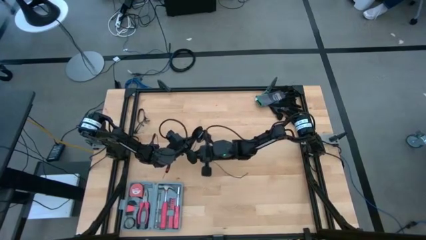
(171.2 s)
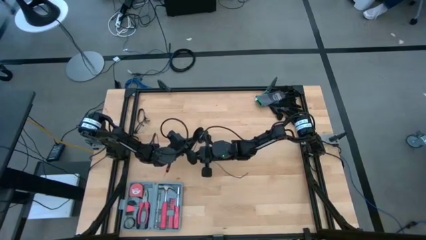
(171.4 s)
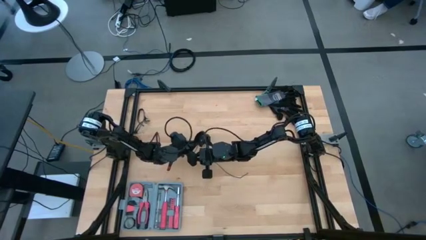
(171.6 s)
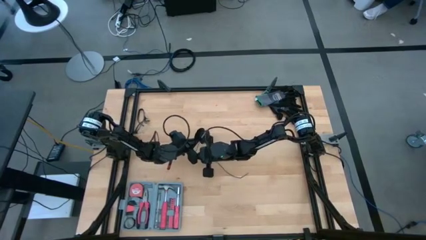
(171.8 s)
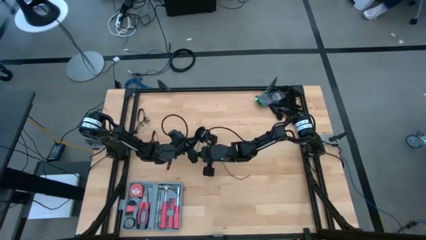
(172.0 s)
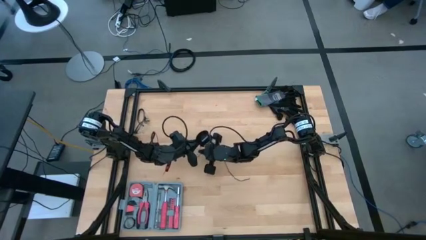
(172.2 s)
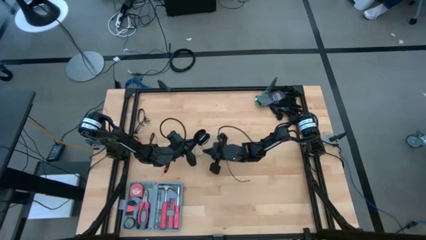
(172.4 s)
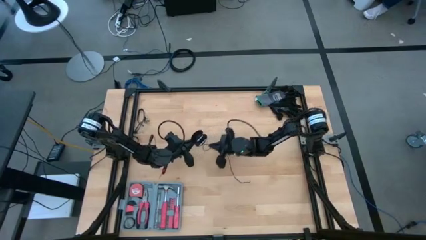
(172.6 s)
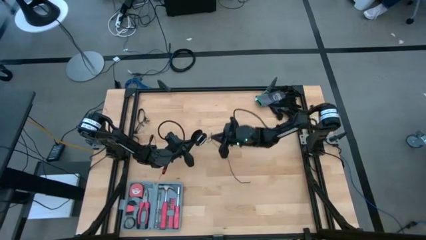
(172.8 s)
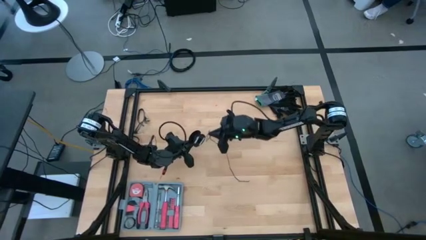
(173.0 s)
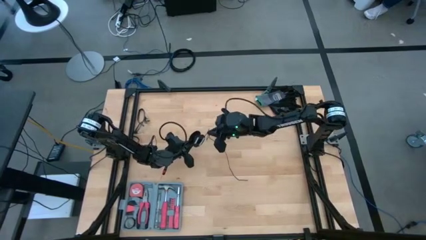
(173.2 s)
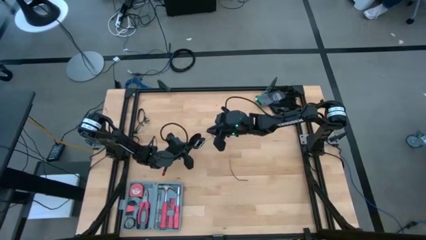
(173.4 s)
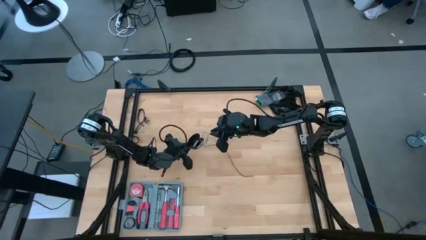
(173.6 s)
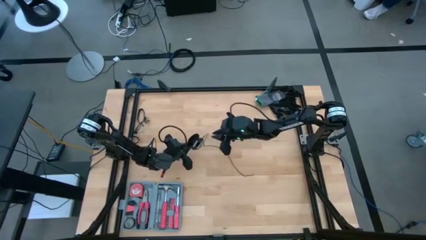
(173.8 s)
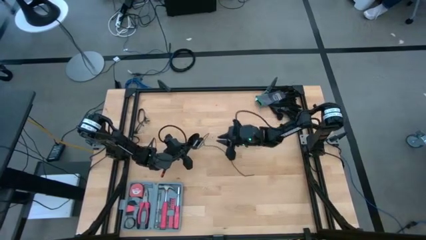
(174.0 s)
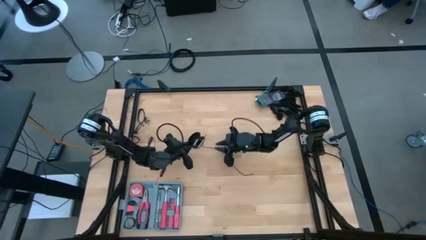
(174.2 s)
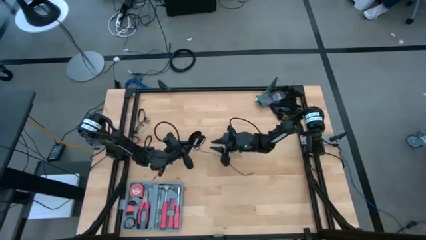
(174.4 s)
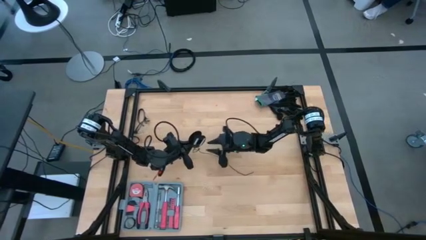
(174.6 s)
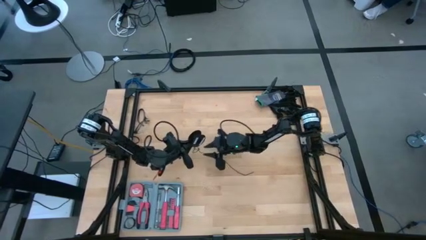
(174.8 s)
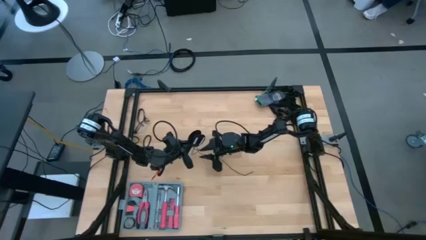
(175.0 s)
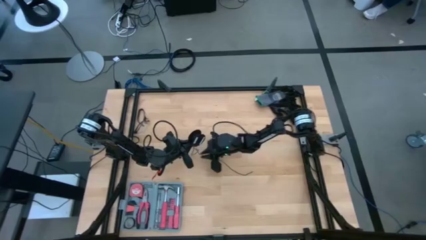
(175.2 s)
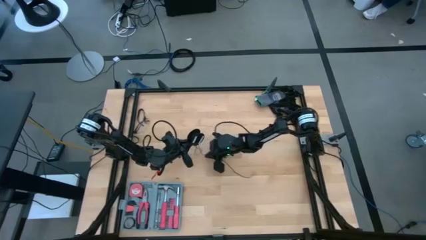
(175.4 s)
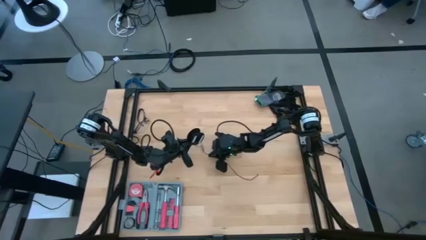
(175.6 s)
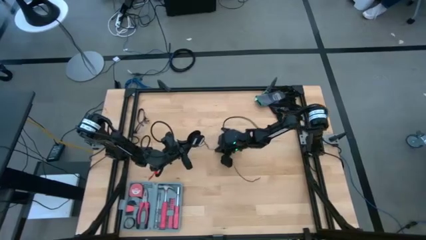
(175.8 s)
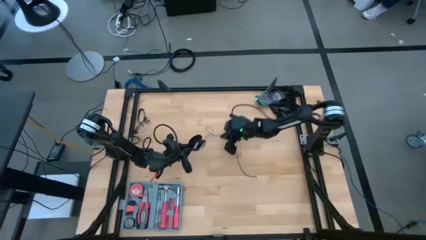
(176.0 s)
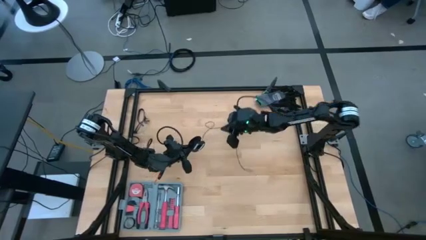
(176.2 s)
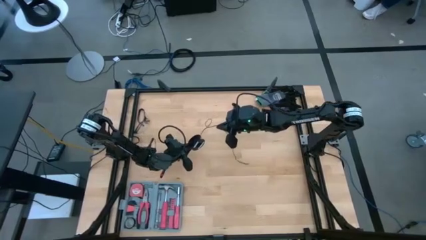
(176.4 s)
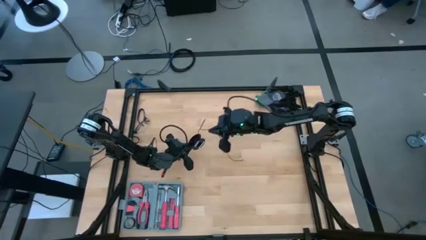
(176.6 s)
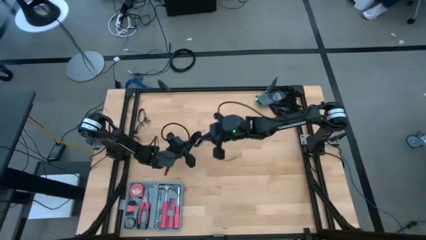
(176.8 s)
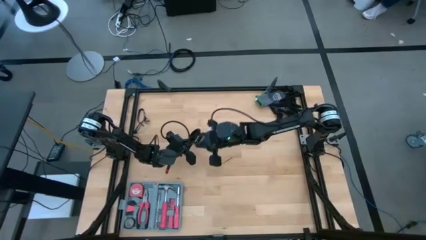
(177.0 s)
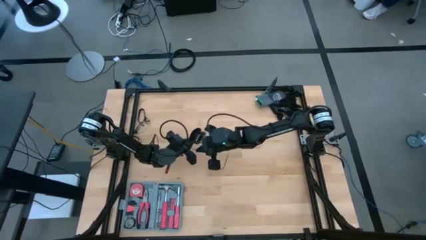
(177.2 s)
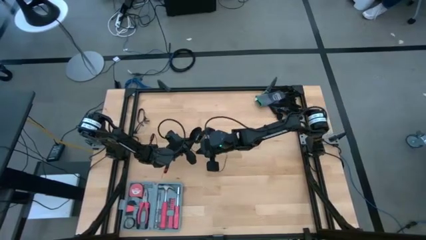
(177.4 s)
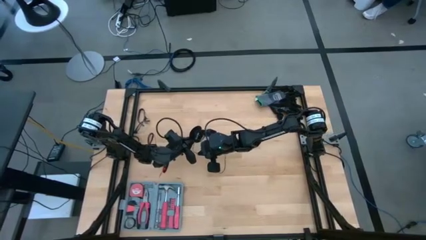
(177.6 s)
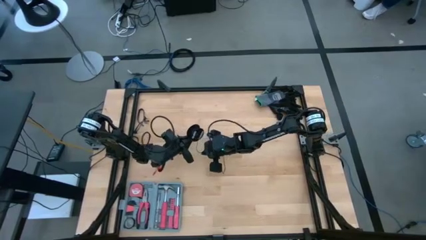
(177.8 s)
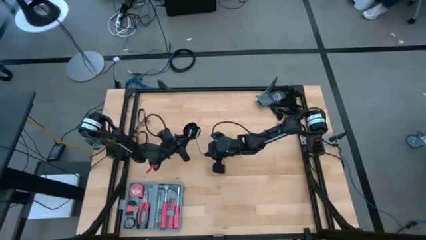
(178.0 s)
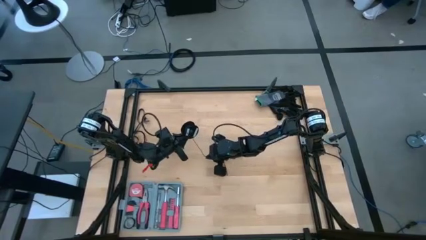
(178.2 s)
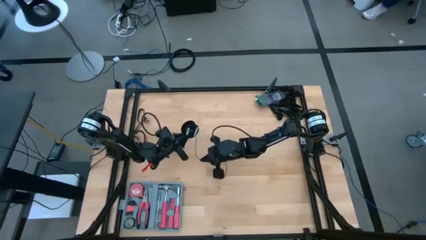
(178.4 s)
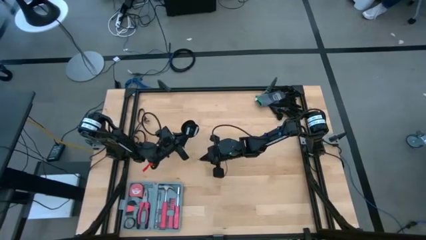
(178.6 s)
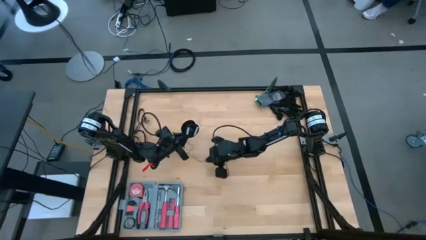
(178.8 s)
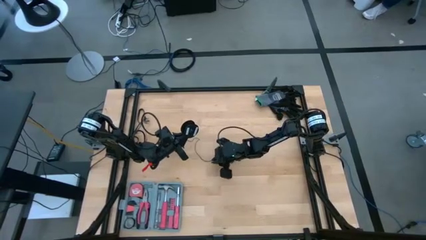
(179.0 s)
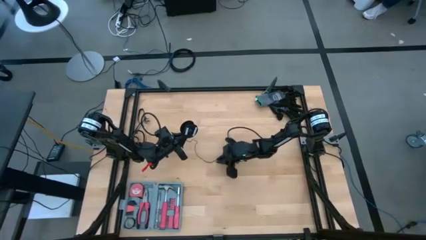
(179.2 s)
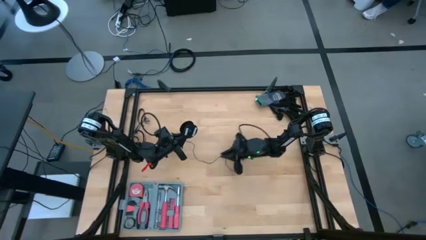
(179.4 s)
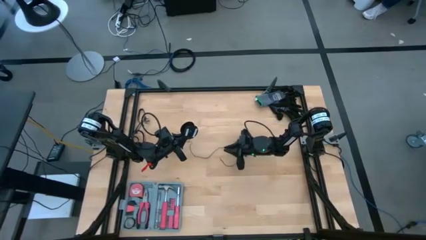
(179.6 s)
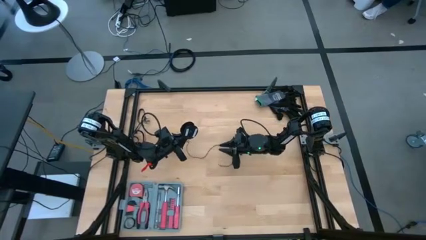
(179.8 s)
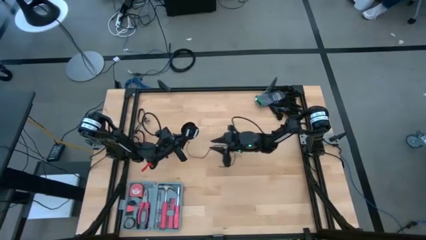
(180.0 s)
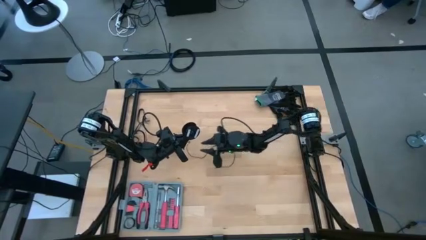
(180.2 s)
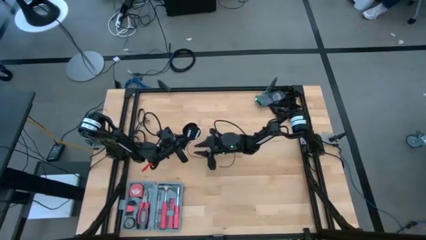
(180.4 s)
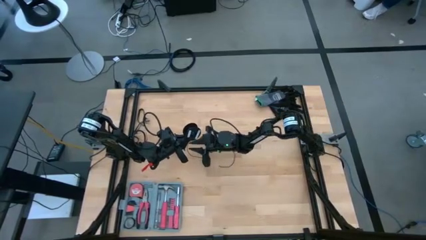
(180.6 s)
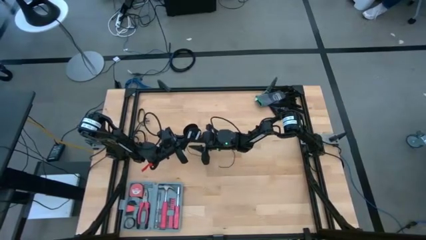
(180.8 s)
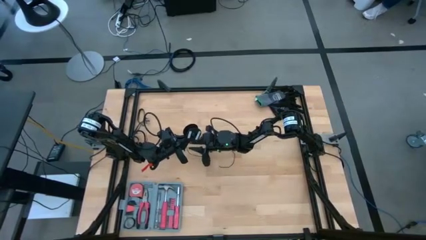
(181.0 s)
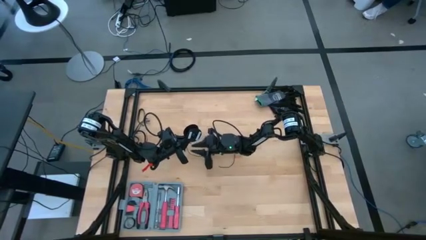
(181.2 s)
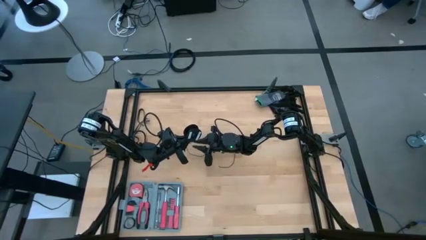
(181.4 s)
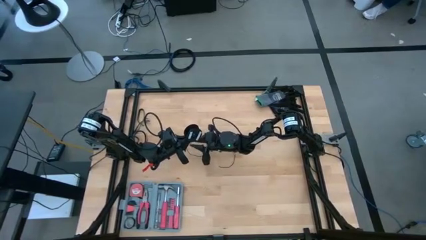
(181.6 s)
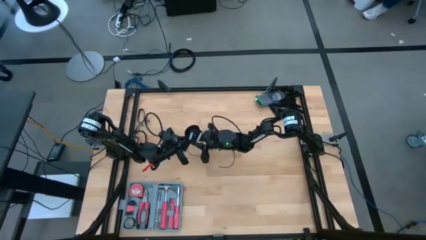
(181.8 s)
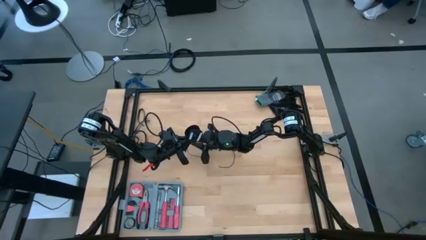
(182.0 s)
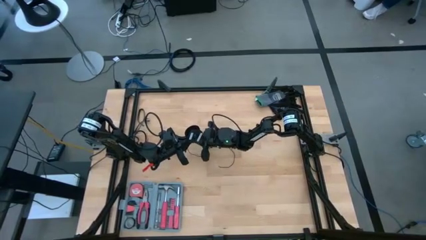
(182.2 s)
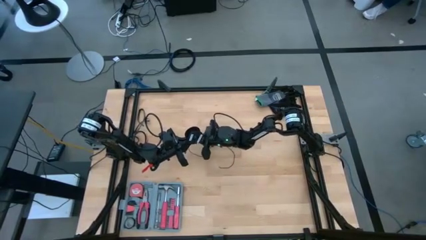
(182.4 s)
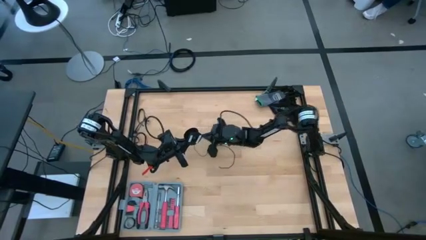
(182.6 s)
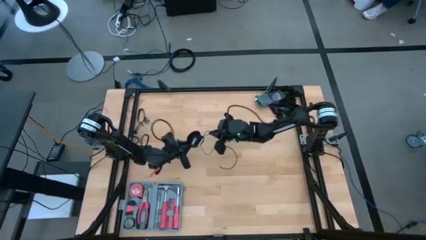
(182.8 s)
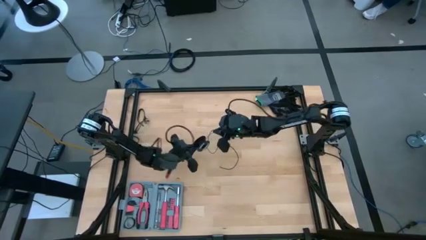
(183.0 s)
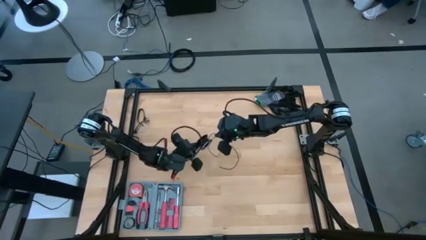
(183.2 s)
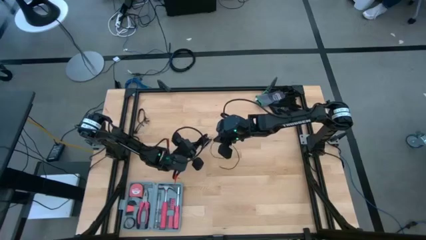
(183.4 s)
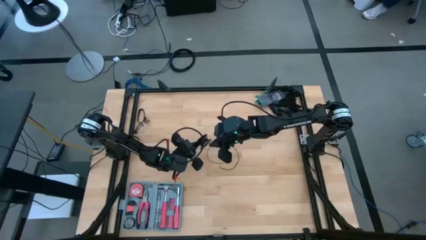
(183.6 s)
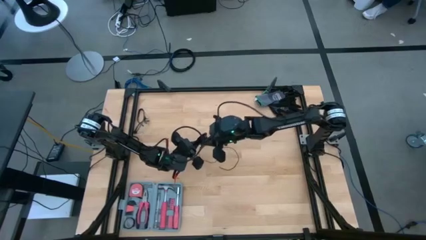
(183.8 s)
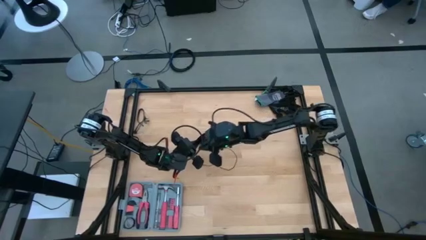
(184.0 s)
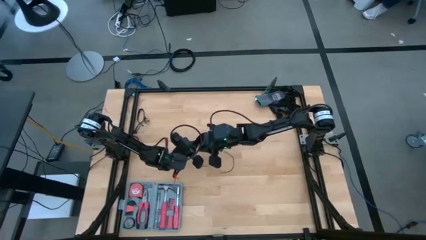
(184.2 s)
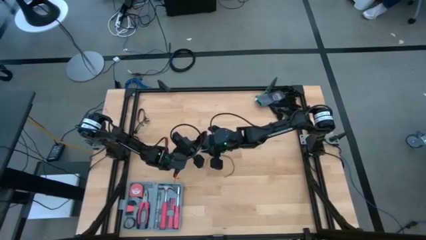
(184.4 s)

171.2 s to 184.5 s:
Task: Coil cords
Coil the black wire onto the spool
